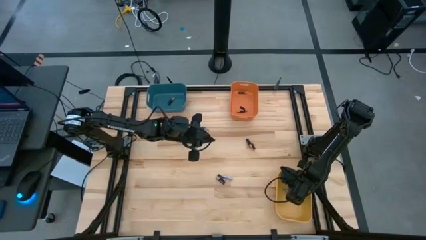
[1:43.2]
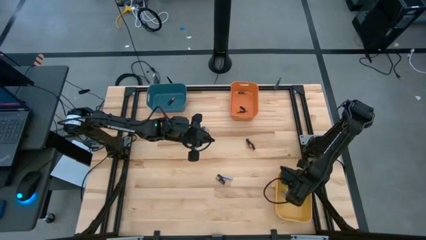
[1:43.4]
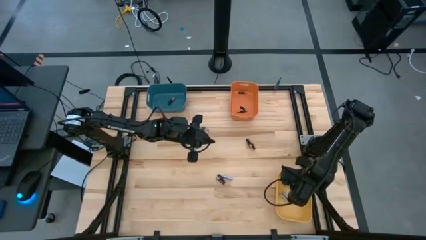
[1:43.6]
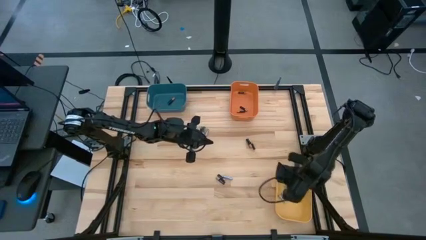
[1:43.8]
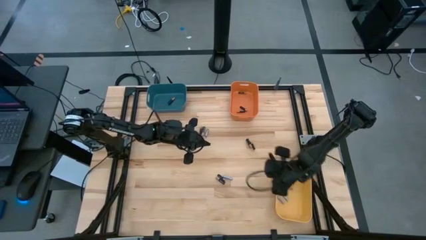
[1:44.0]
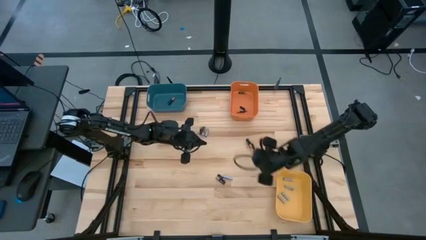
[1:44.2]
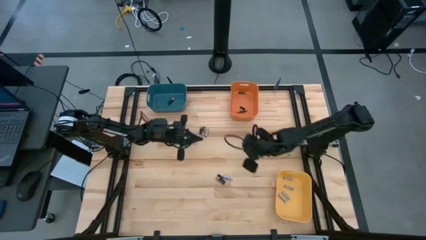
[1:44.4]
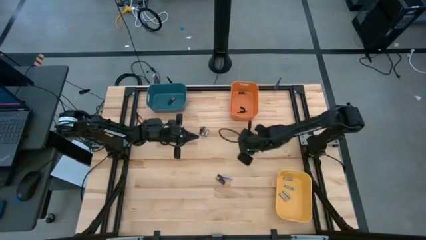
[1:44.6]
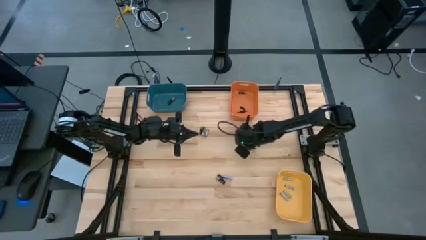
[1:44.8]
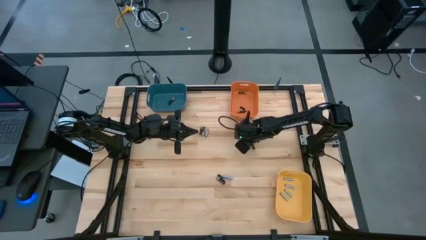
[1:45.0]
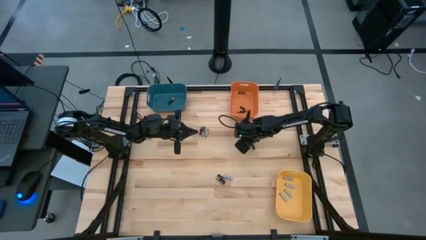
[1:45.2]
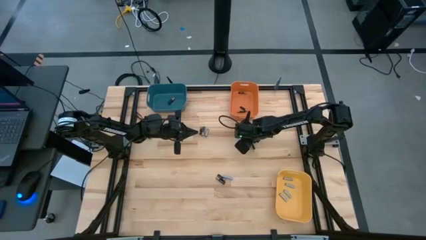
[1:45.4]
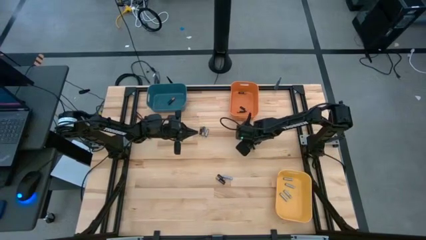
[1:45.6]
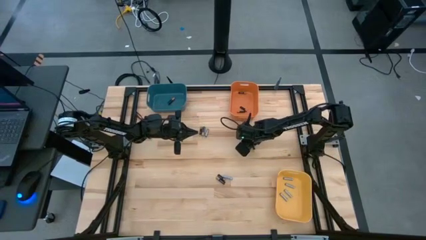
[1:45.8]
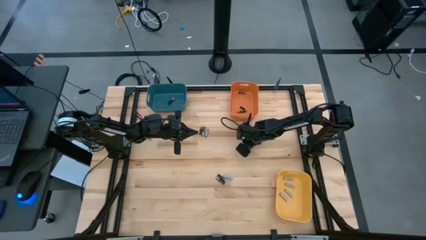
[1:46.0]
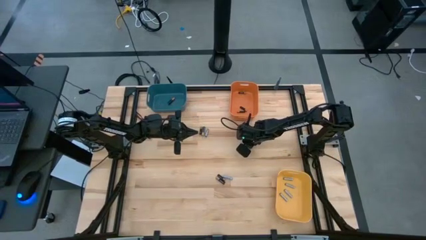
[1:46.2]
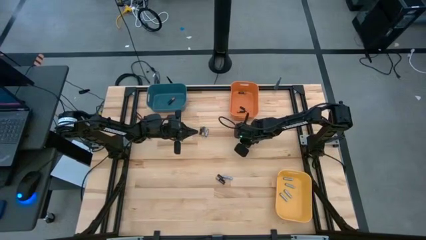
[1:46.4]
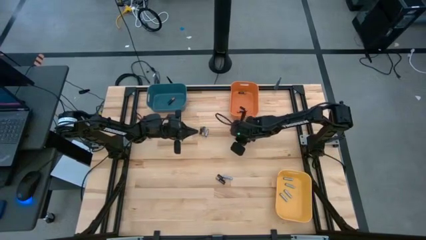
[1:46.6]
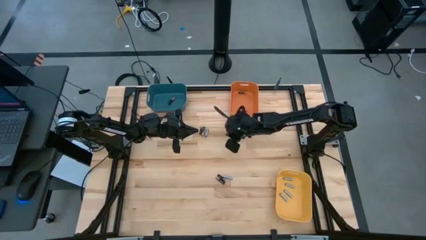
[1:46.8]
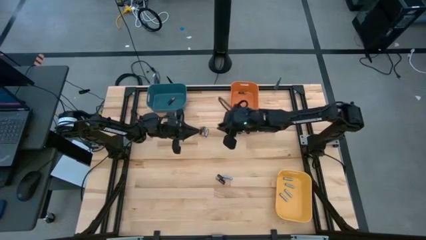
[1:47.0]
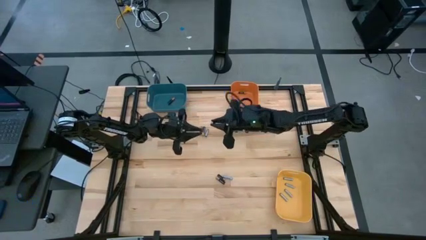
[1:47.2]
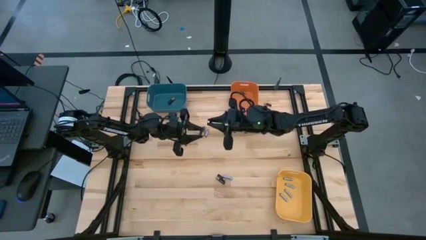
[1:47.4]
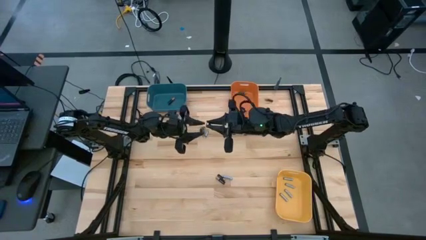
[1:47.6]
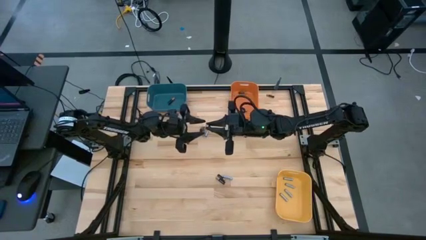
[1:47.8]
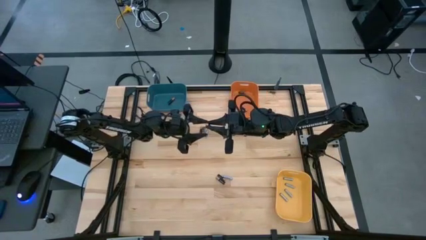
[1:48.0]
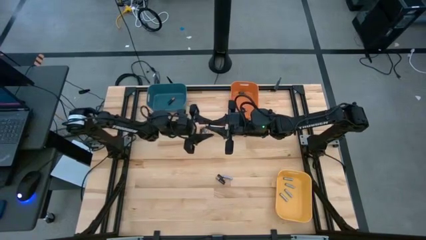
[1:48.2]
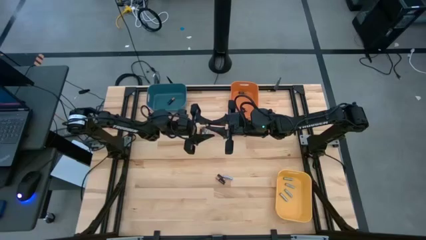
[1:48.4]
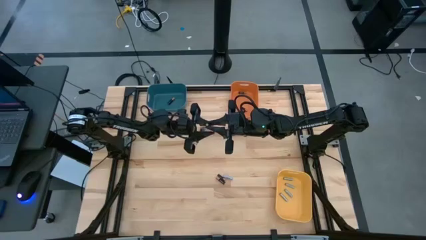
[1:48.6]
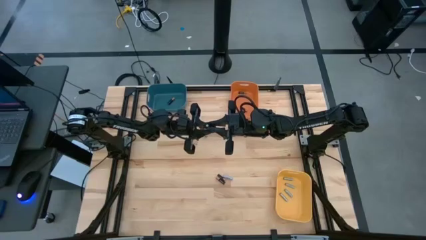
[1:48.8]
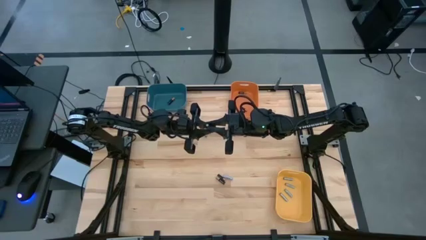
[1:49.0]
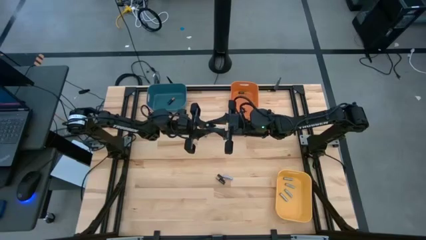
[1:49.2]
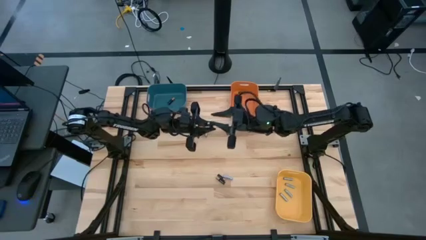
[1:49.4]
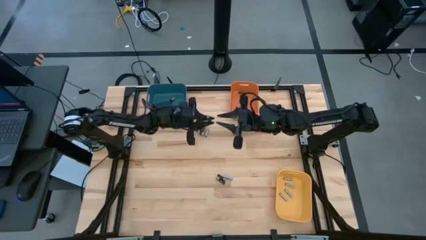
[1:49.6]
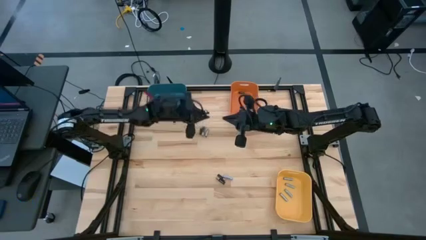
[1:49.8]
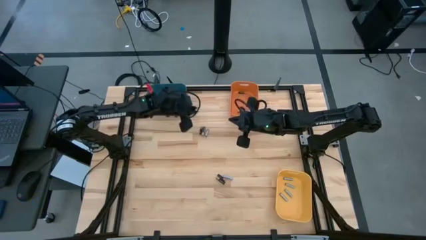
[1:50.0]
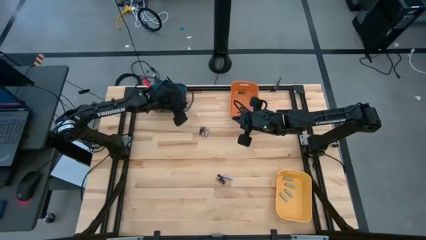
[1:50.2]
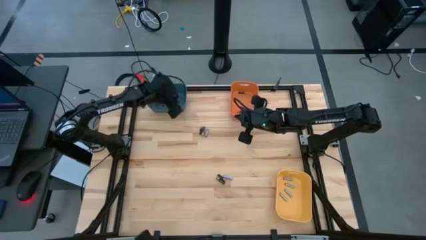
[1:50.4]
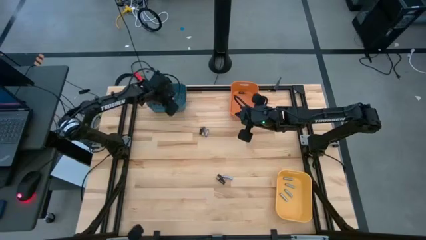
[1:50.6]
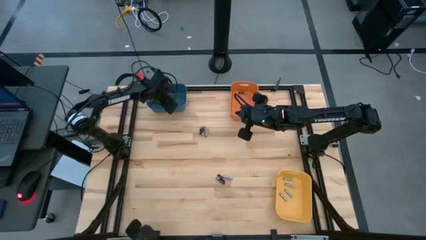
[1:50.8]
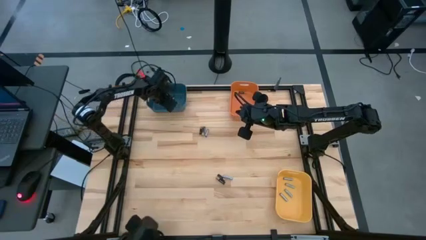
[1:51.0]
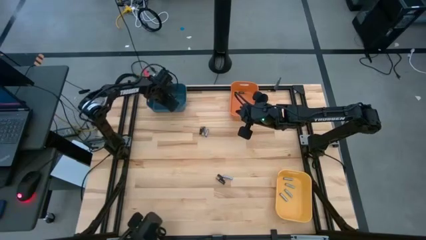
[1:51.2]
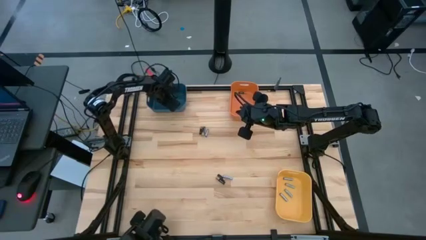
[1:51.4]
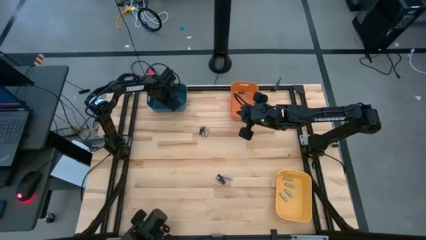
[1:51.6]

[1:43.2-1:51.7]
Task: Sort batteries
Put the big black battery into the blue bin

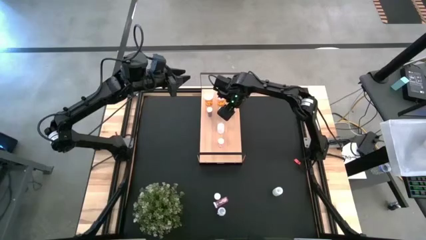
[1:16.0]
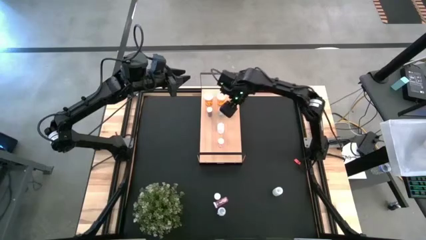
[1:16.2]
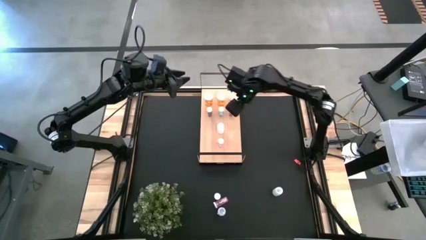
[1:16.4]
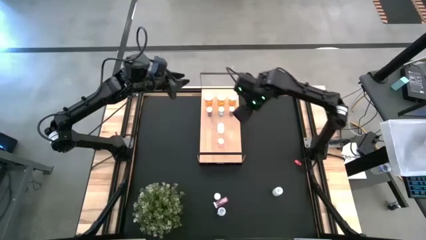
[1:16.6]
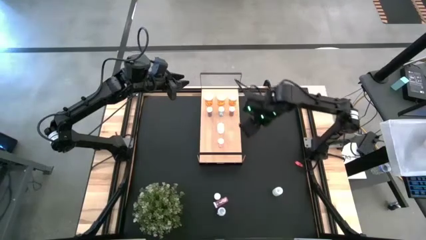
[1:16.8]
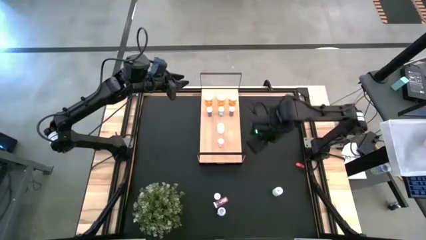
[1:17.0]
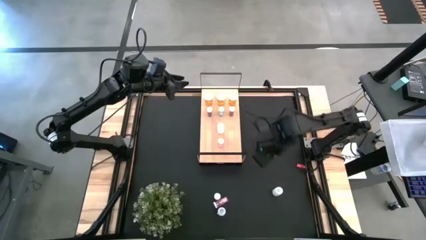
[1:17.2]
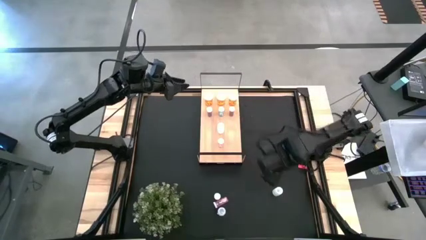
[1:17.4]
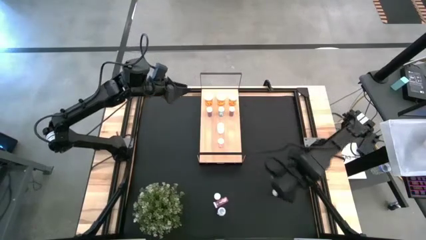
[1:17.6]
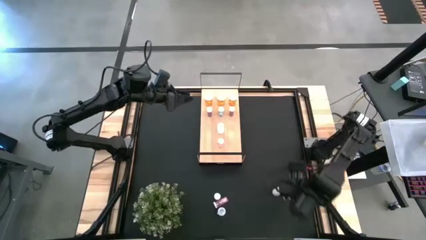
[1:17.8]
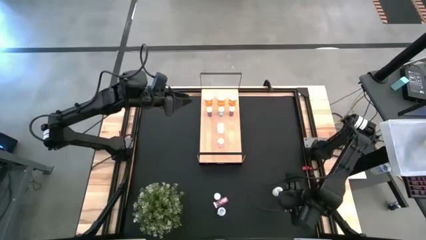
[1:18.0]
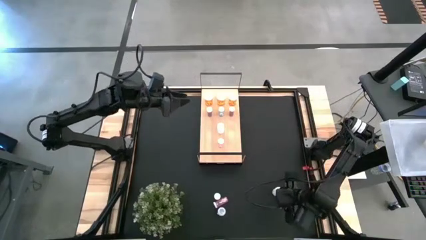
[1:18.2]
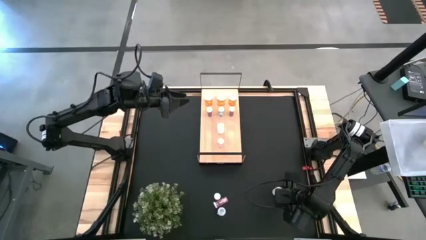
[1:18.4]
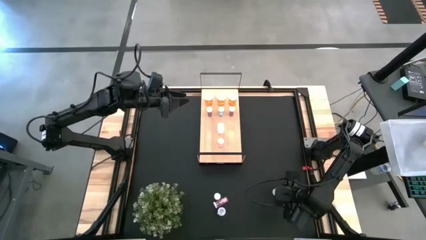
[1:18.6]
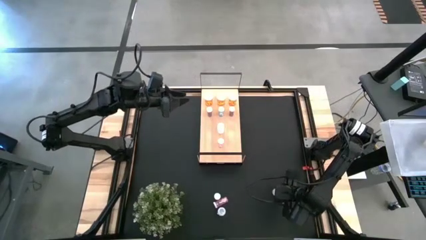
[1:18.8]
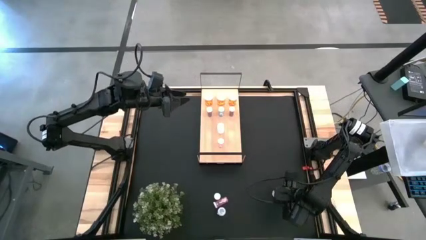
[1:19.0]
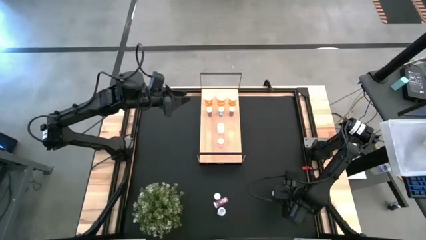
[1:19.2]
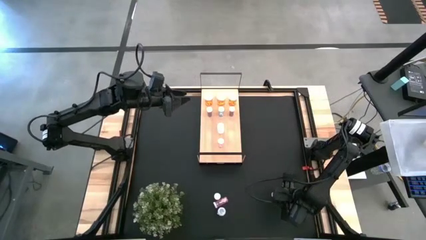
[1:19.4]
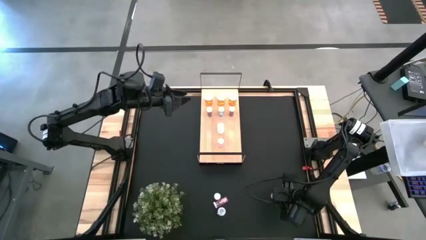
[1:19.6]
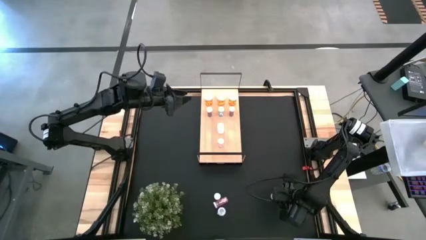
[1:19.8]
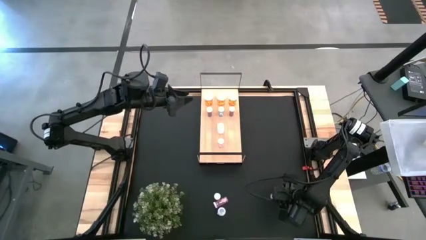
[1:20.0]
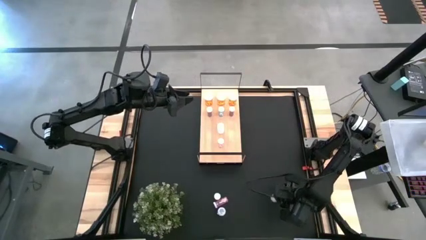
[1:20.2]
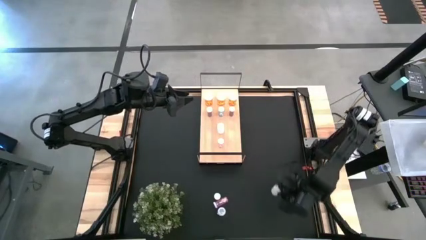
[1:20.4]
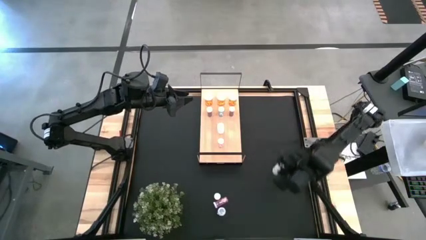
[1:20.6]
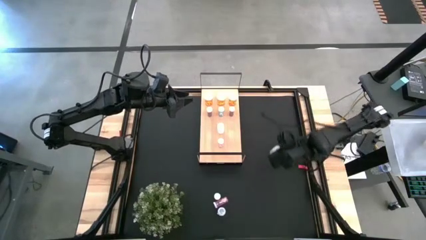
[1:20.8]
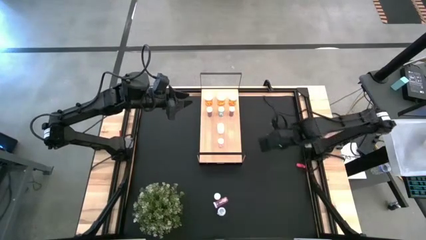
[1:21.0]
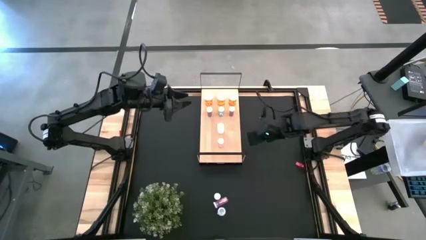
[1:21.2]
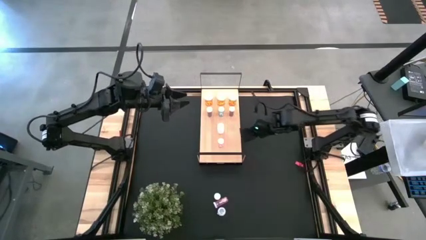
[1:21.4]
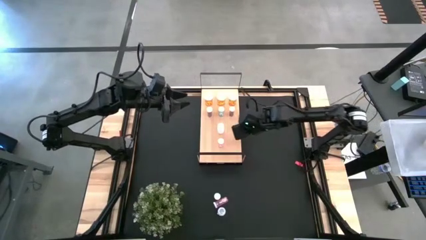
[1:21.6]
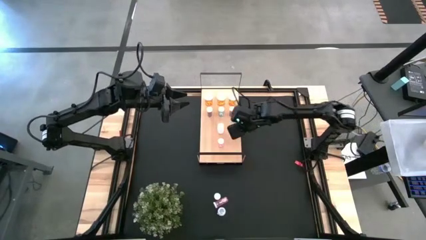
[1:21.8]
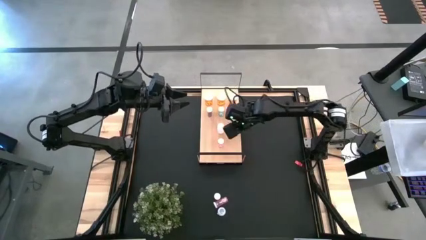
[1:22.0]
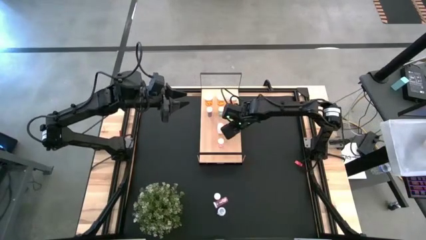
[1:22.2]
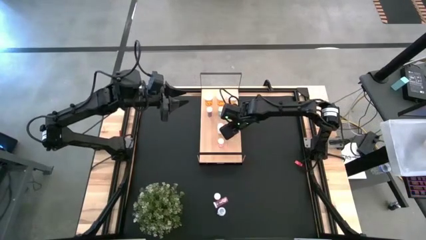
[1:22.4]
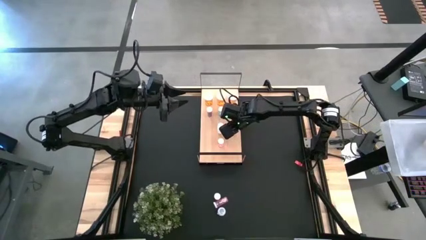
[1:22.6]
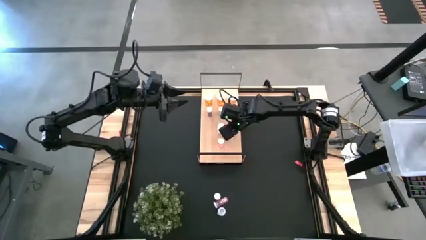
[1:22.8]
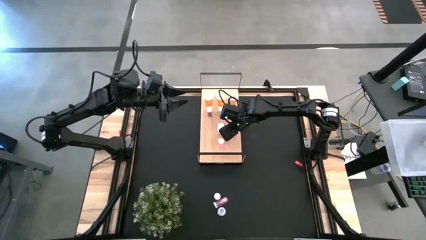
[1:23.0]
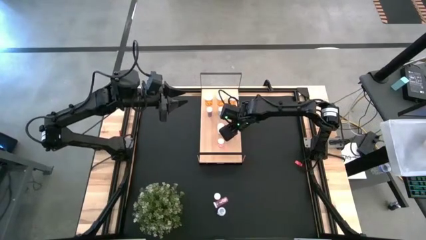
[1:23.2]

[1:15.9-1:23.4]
Task: Pick and place medicine bottles onto shelf by color
Put the top white pill bottle aligned with the other white pill bottle on the shelf
